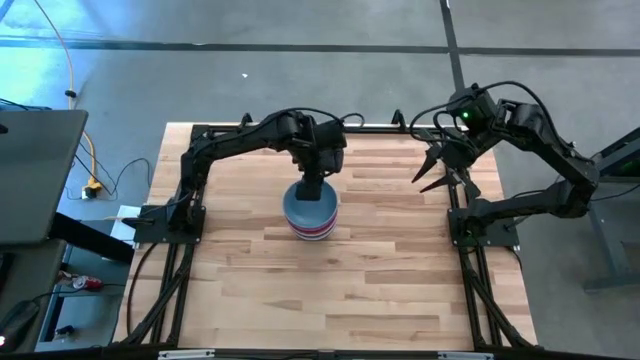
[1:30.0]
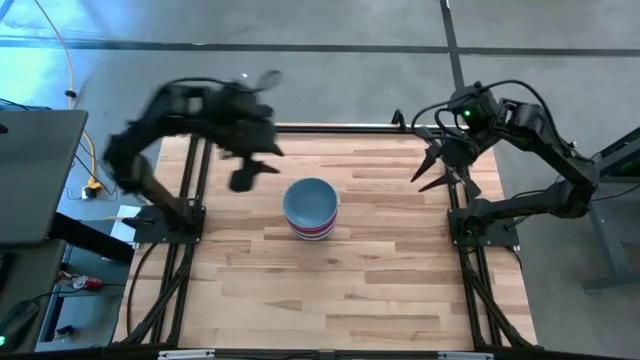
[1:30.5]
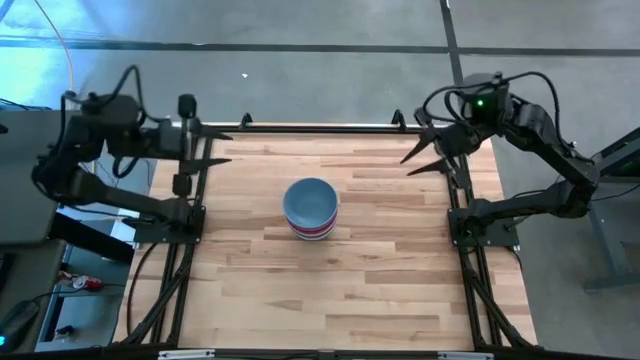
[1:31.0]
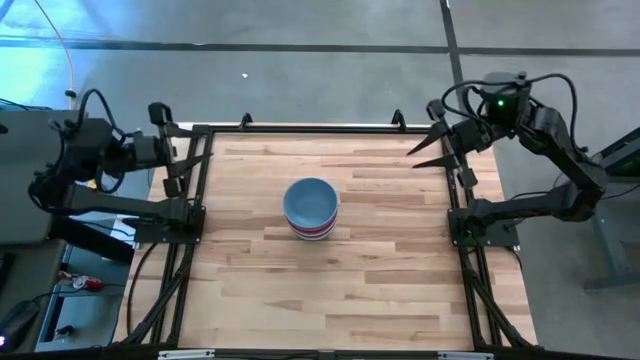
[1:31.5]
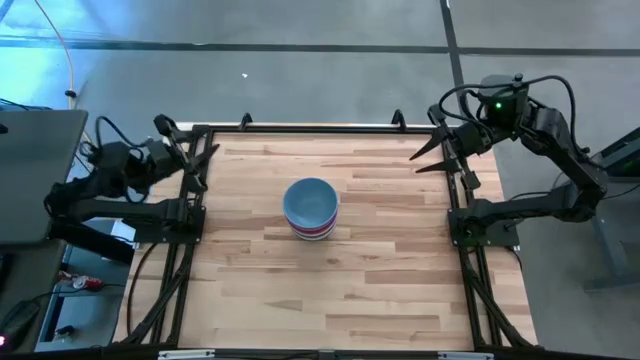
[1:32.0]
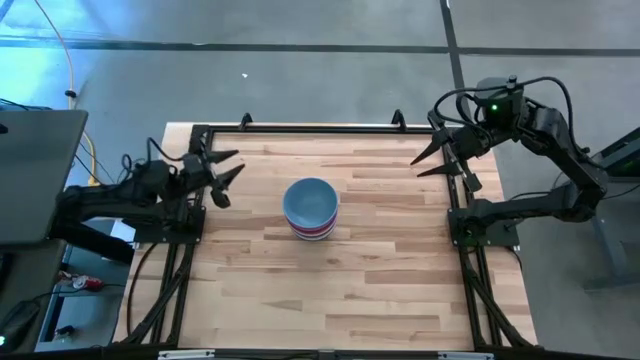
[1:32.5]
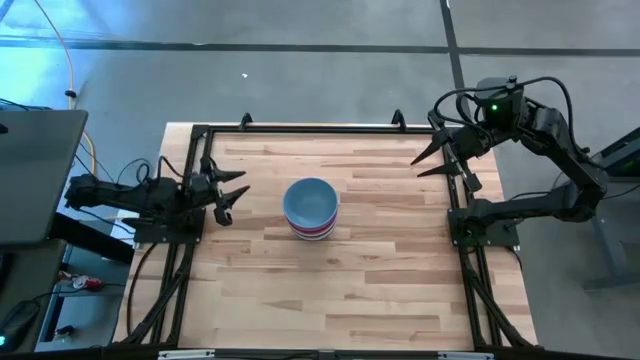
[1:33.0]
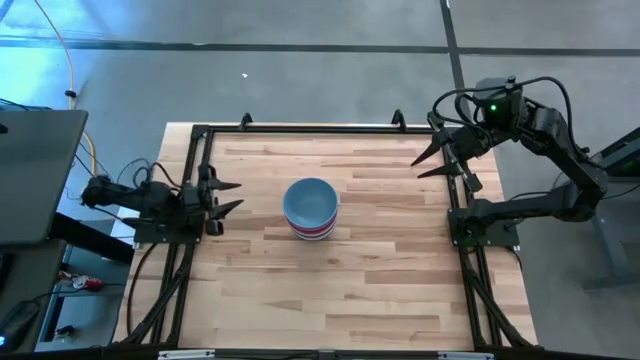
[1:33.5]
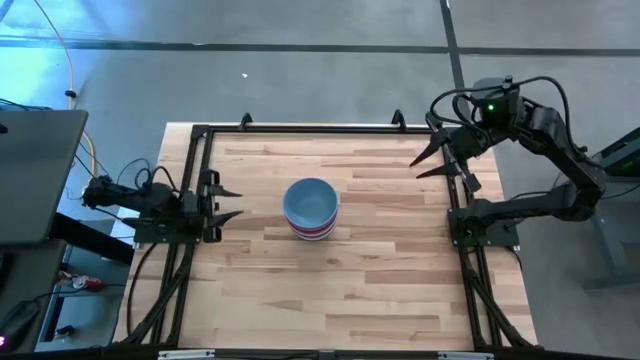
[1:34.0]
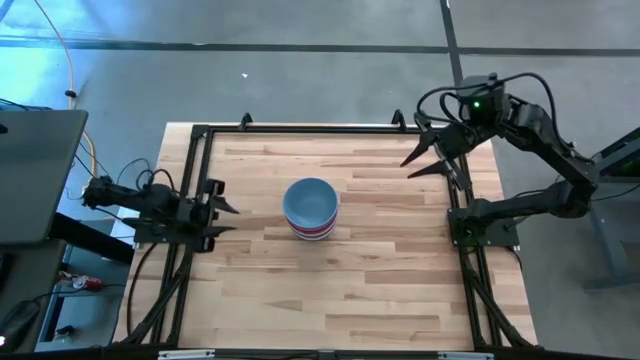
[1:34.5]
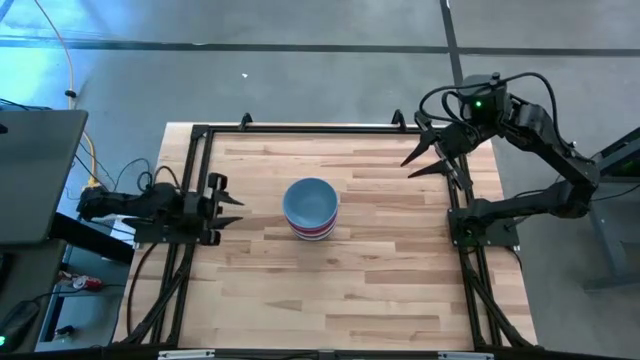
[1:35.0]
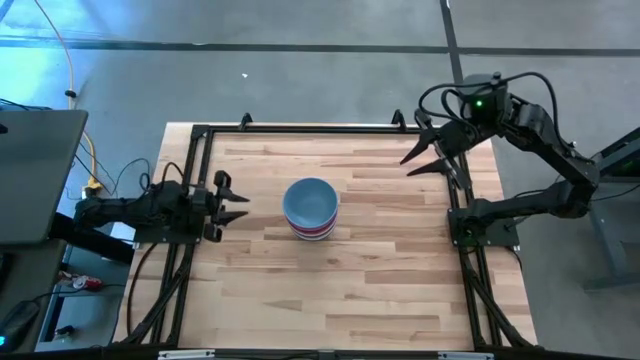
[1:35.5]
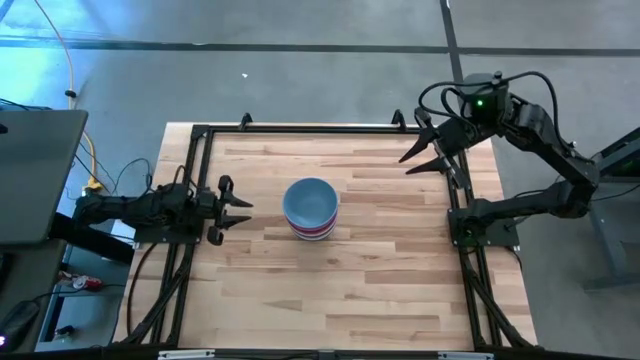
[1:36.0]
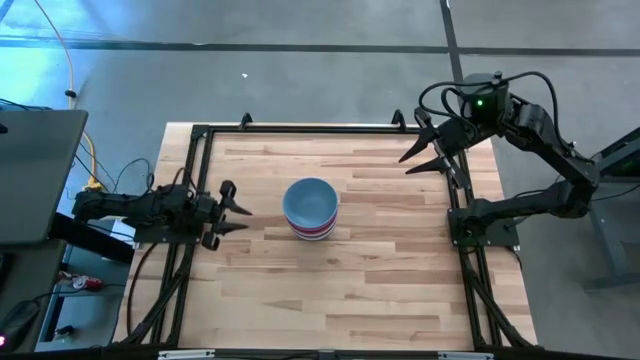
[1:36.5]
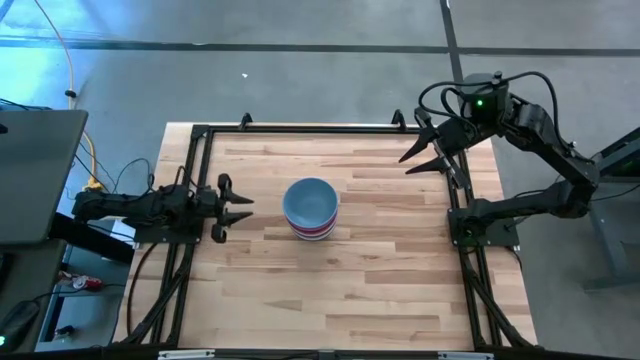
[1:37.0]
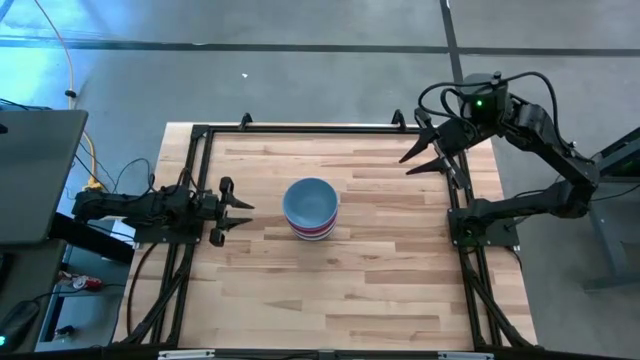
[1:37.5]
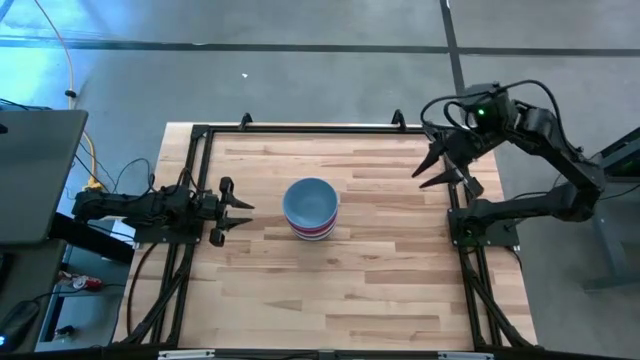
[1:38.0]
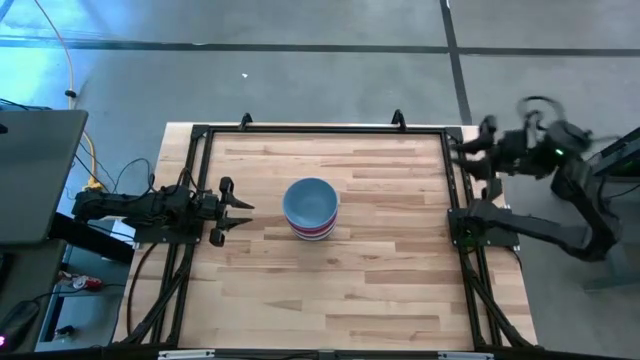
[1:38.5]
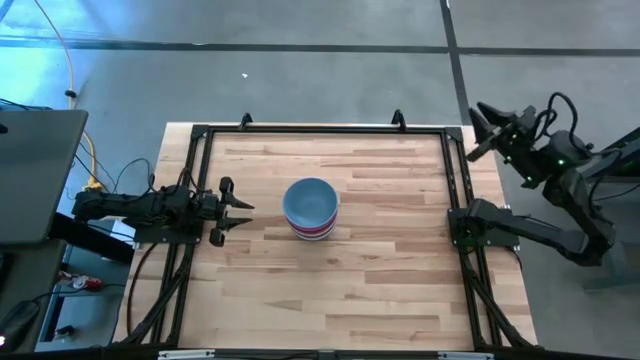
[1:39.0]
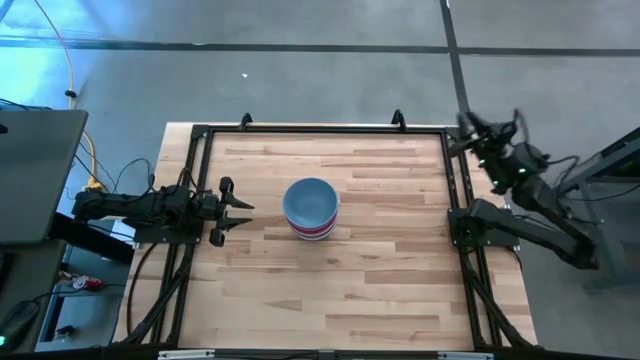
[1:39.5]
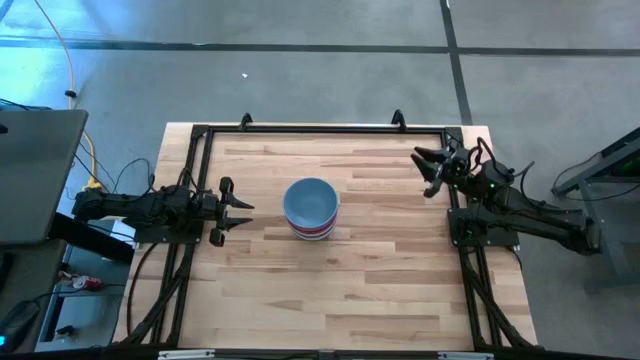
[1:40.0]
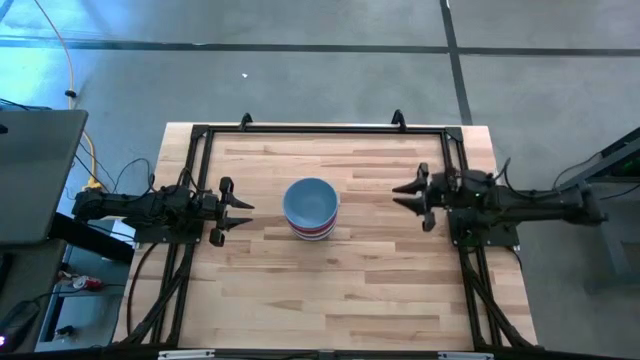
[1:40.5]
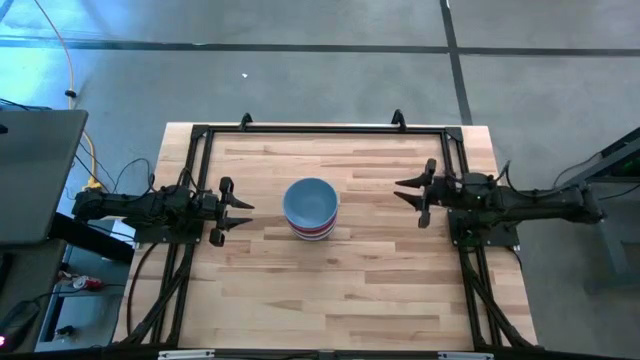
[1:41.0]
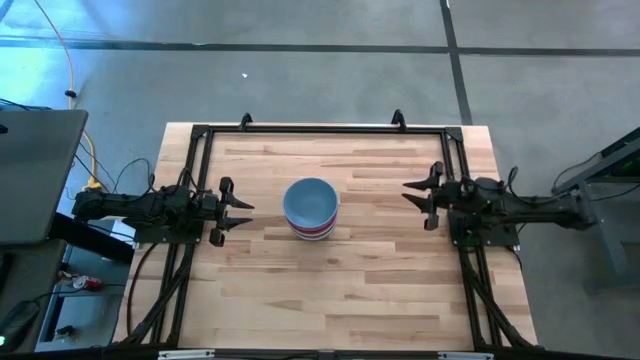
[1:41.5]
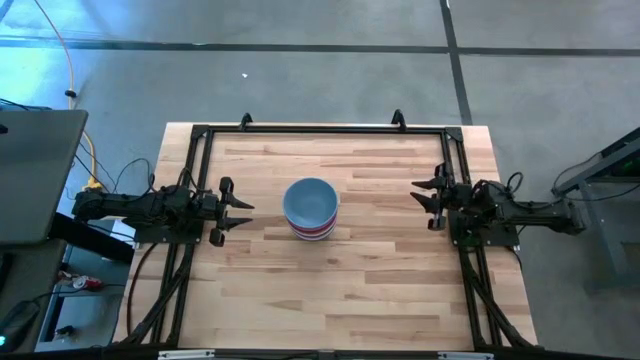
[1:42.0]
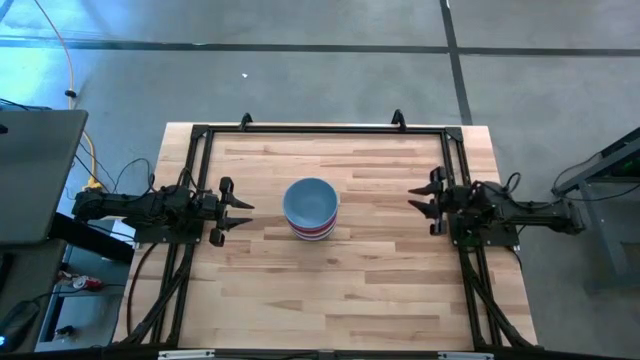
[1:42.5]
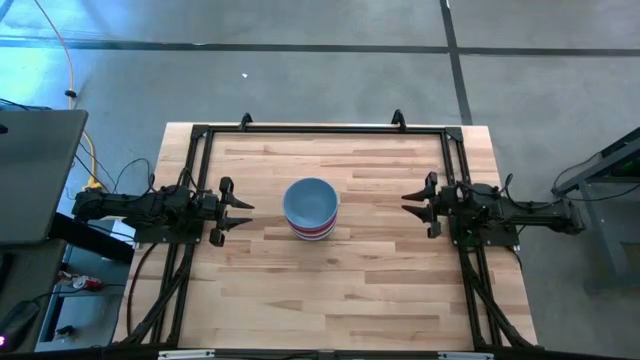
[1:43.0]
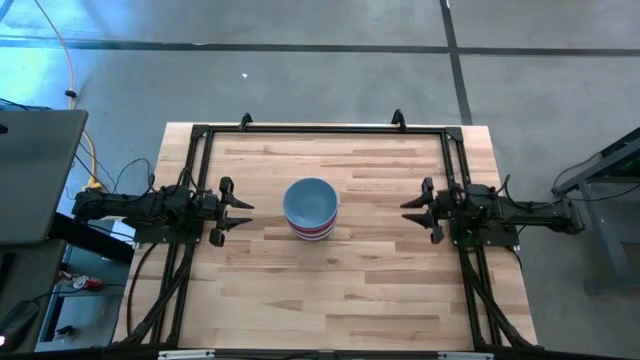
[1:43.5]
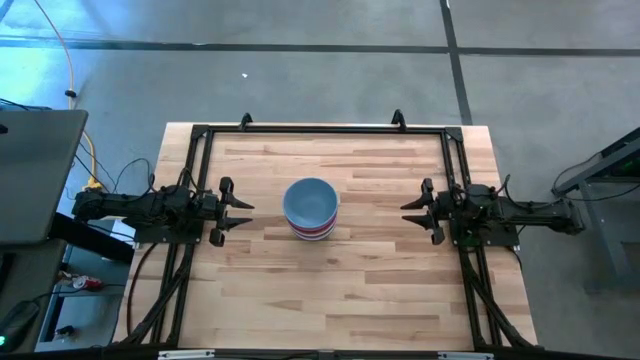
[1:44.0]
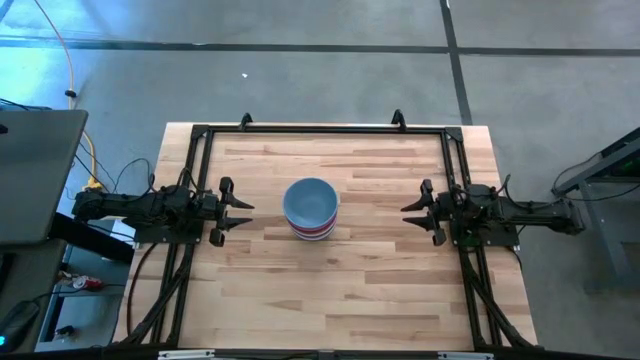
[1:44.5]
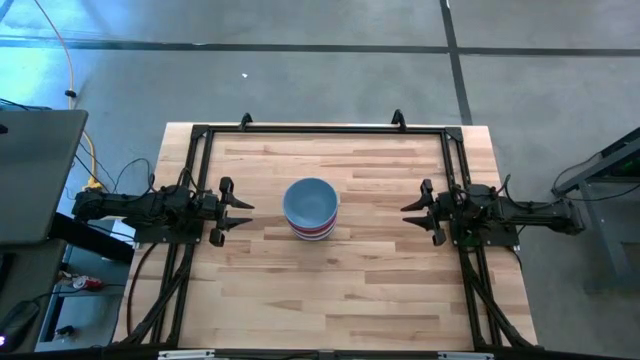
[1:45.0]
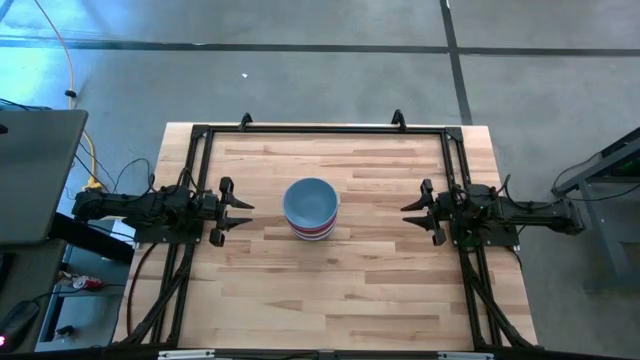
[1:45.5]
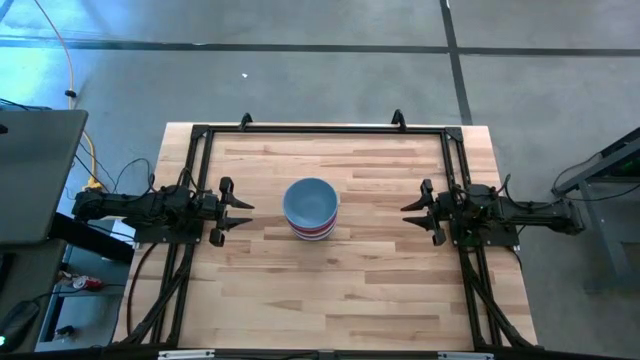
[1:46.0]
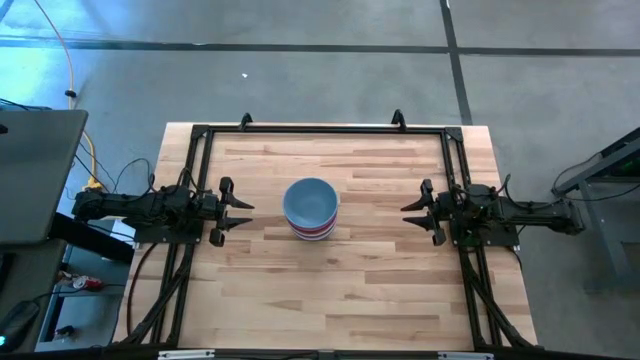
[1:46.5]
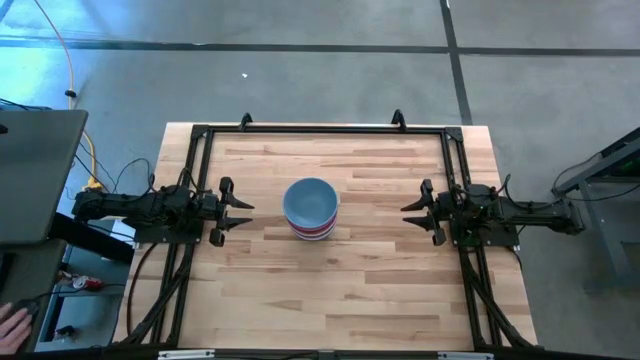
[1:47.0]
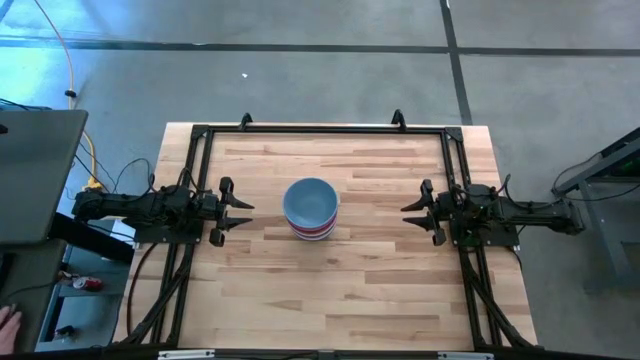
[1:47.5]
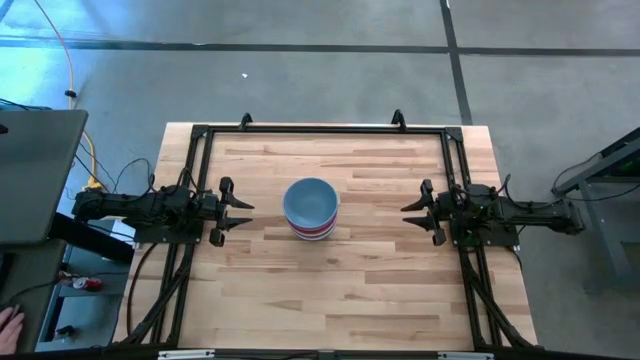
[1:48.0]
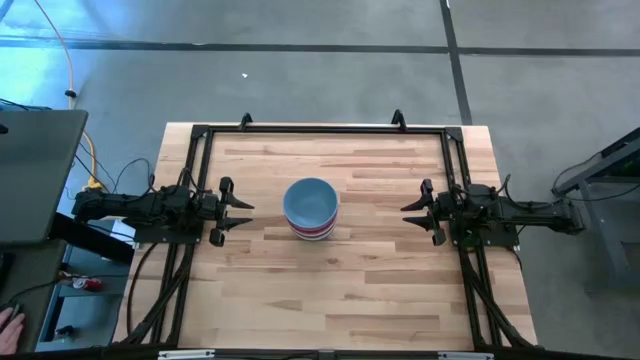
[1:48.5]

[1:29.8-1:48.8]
Task: Nest bowls inside each other
Return to Home Position

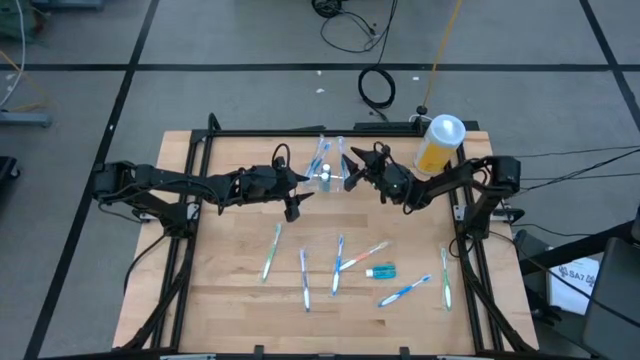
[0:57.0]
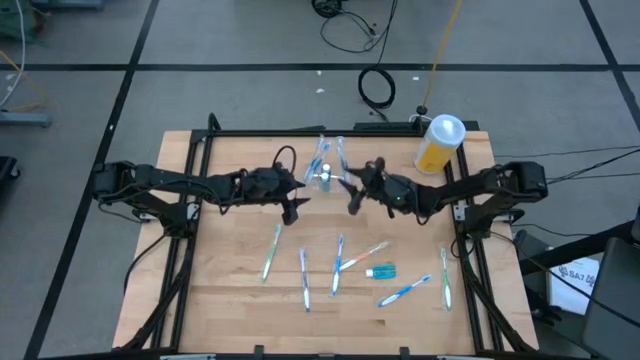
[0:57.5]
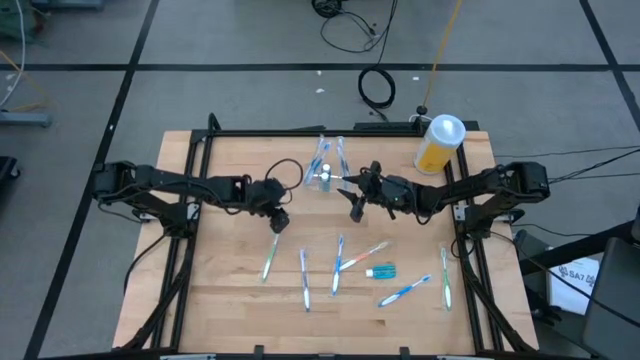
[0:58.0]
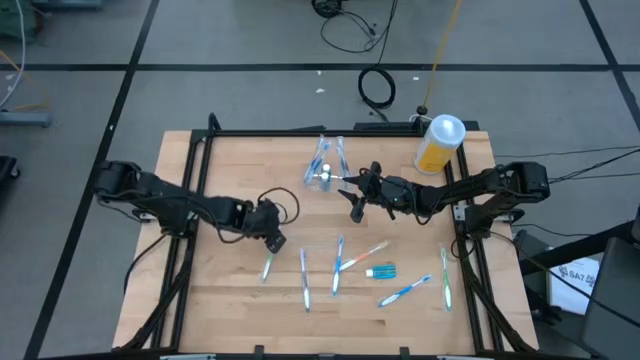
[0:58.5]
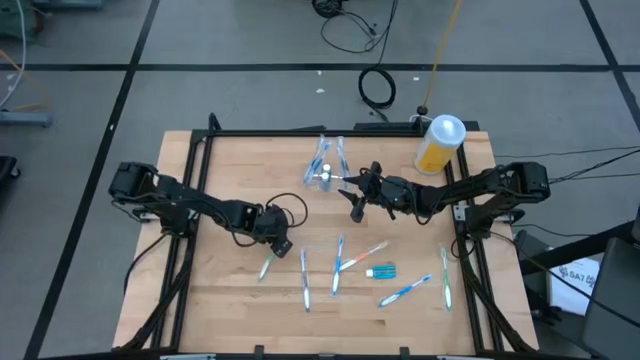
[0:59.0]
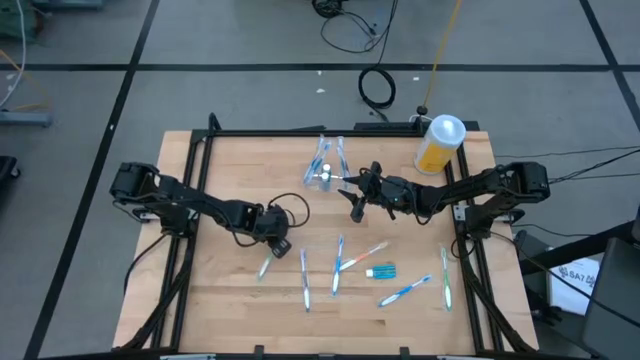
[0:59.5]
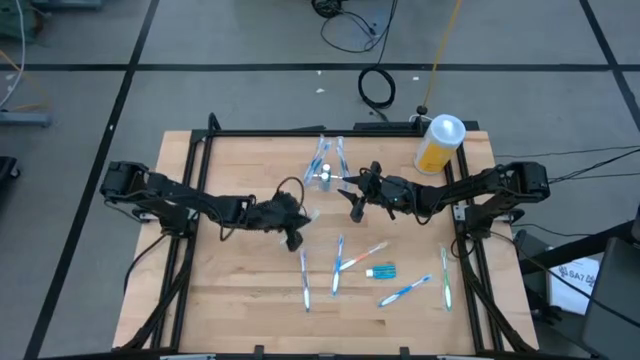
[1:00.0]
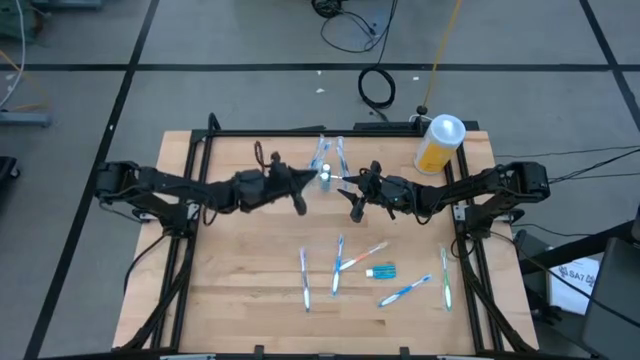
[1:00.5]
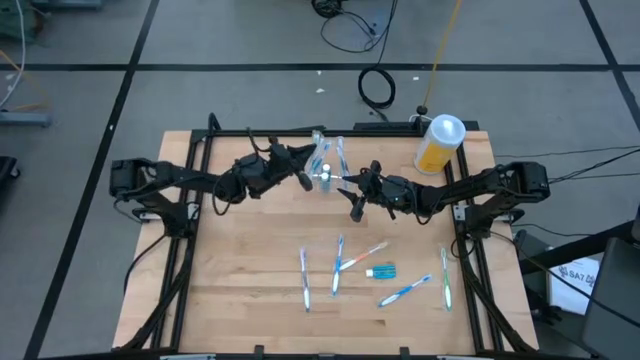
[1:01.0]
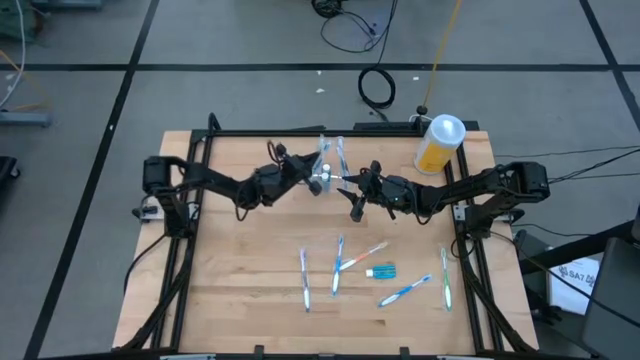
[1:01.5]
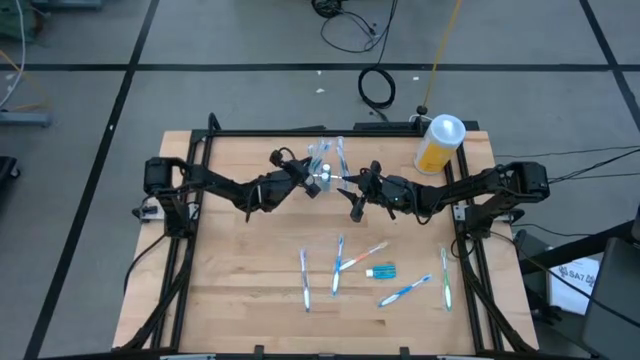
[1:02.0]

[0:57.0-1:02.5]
Task: Pick & Place toothbrushing station
Put the green toothbrush into the transparent organizer
